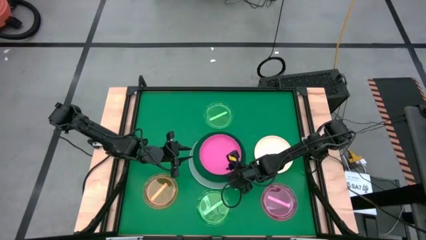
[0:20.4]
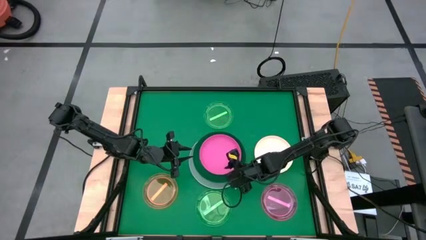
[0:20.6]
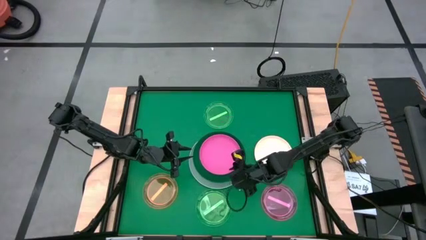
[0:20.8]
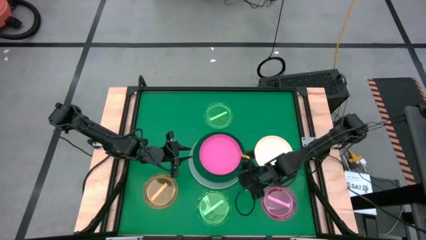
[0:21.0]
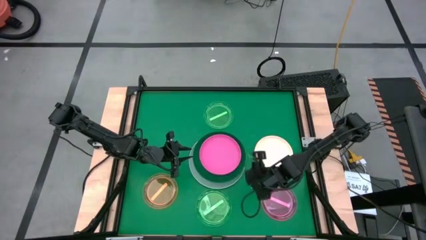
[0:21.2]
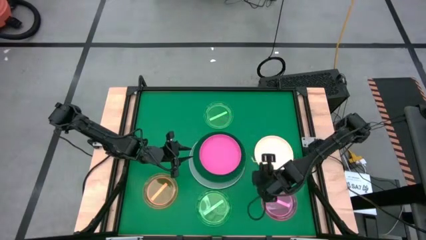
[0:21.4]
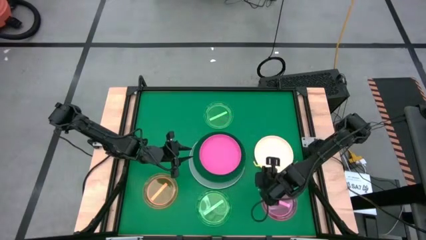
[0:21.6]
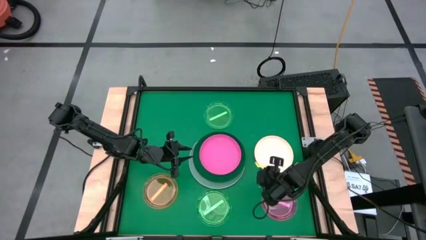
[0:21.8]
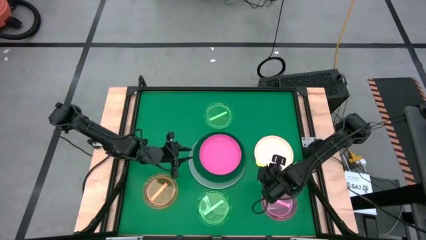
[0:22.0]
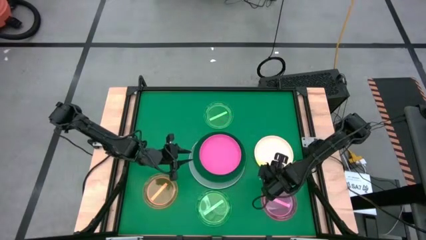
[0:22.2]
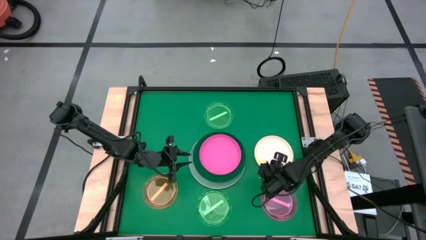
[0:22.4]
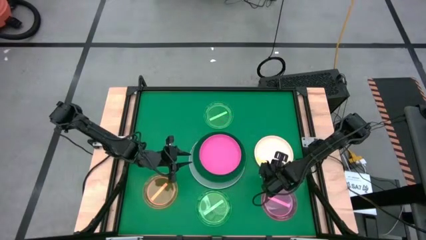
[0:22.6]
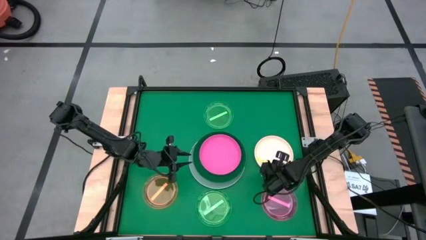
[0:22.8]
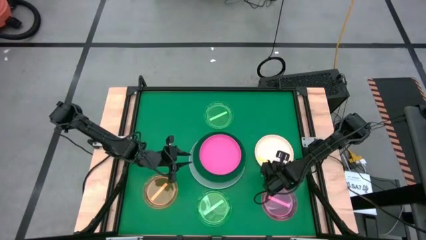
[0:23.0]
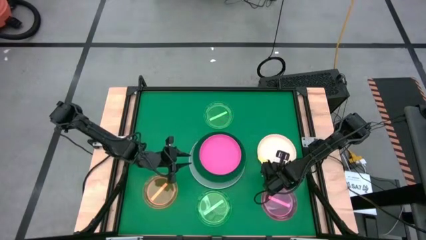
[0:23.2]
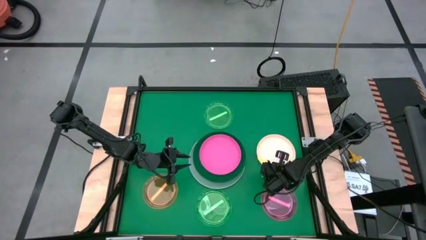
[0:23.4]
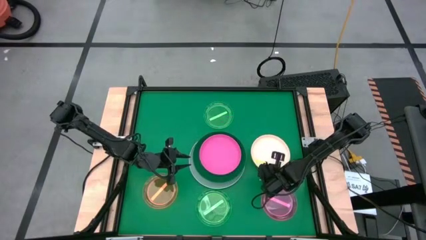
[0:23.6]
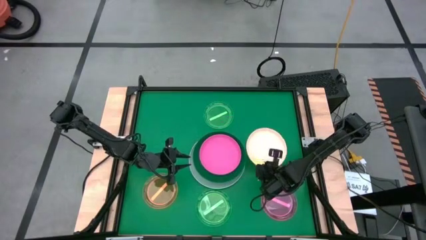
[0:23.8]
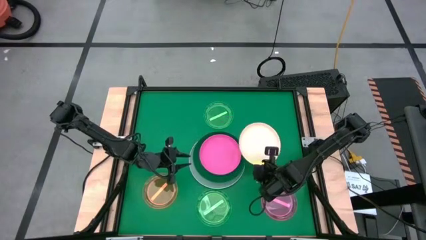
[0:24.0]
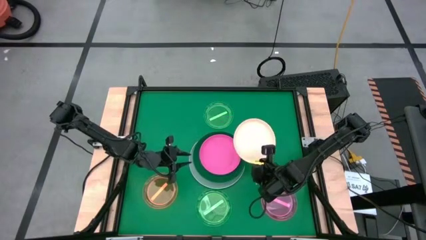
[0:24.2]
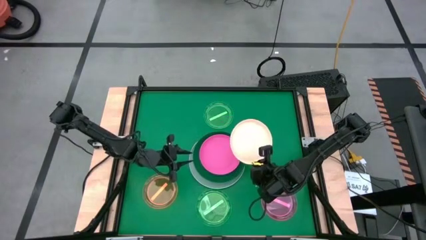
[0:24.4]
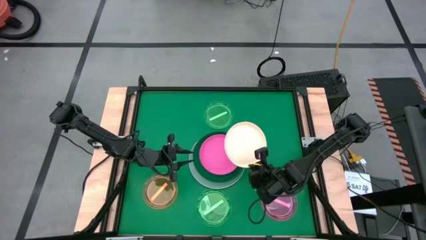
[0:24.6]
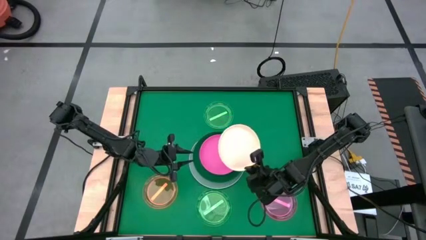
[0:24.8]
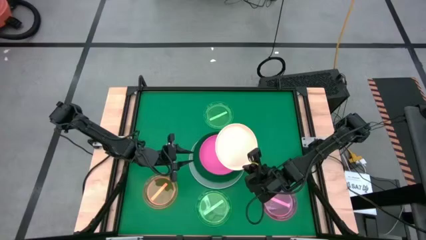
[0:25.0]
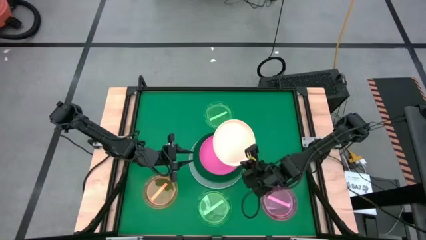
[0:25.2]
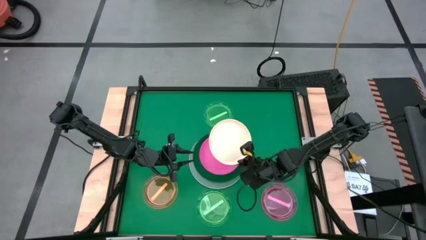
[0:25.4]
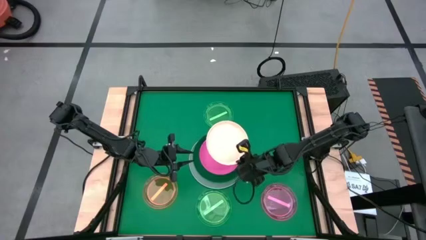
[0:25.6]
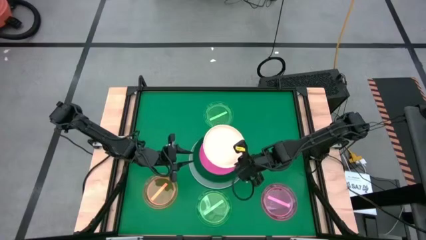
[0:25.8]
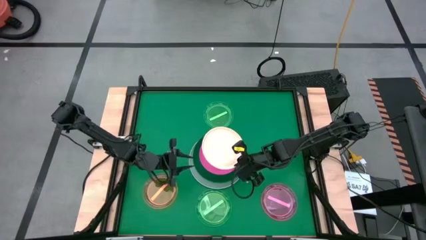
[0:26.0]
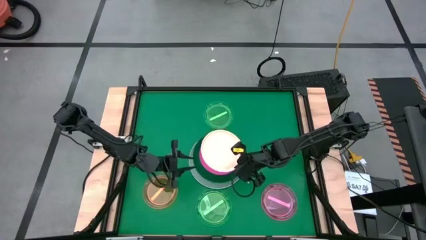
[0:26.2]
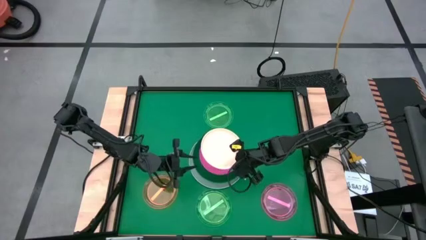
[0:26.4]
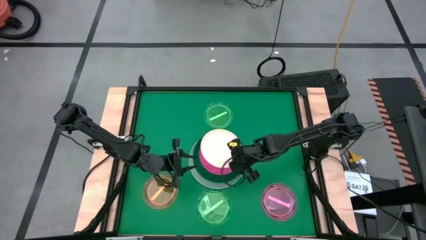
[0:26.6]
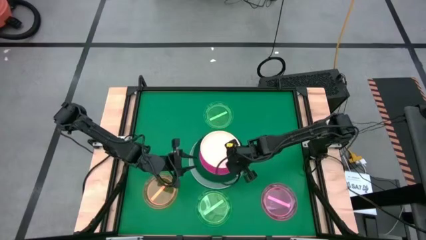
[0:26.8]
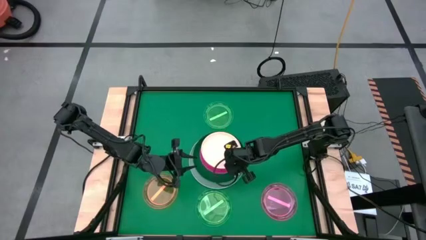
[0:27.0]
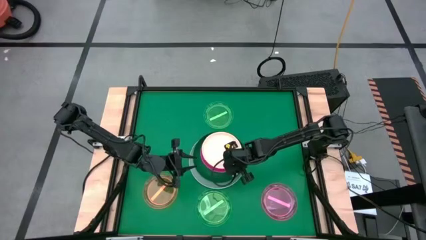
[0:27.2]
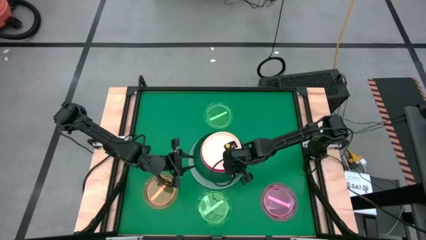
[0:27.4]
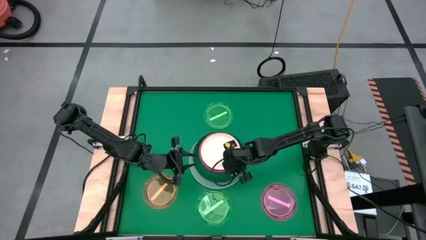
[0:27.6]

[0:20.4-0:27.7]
Task: Stack plastic plates
Stack the large white plate on top of the large pink plate

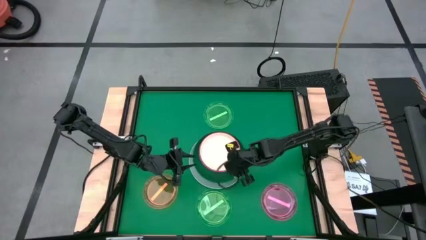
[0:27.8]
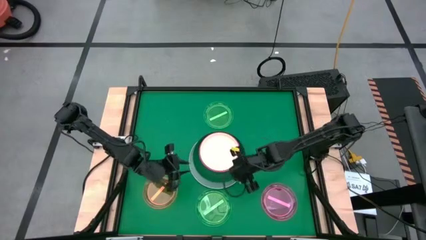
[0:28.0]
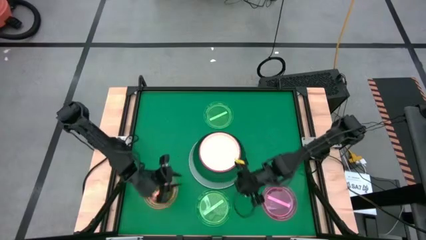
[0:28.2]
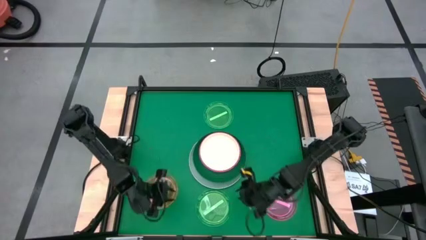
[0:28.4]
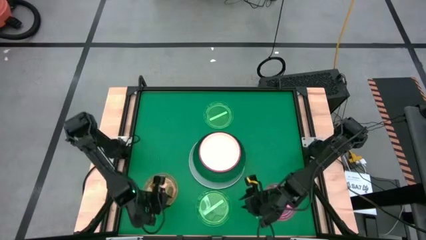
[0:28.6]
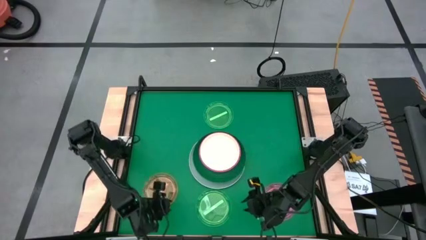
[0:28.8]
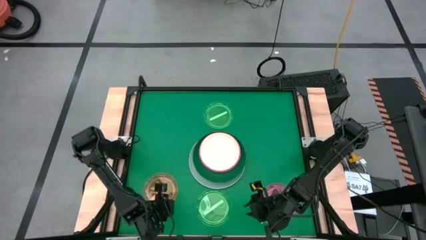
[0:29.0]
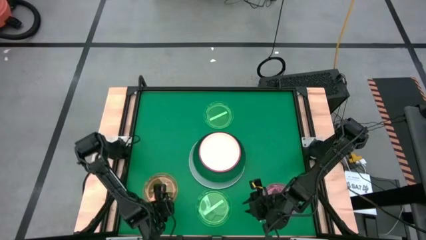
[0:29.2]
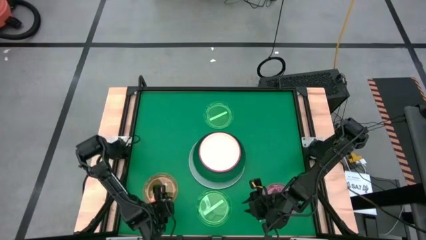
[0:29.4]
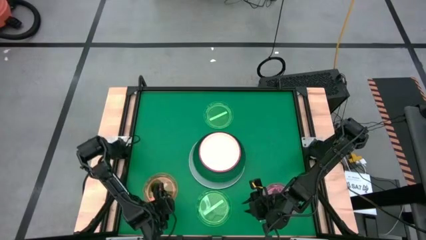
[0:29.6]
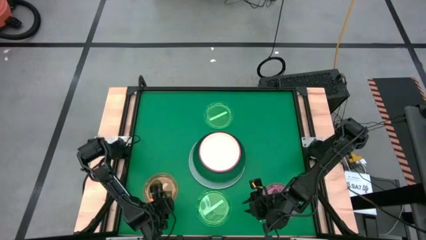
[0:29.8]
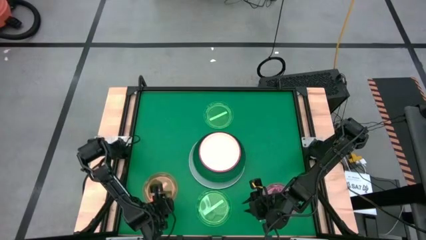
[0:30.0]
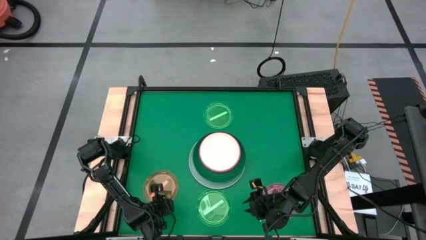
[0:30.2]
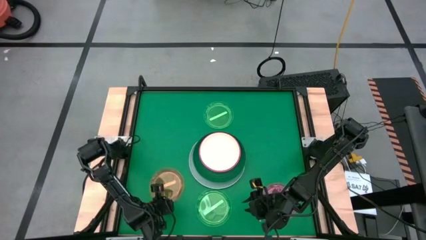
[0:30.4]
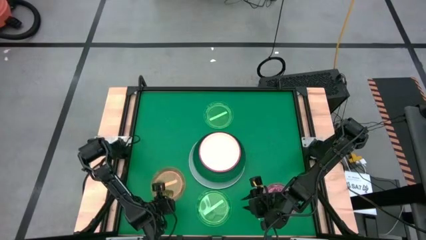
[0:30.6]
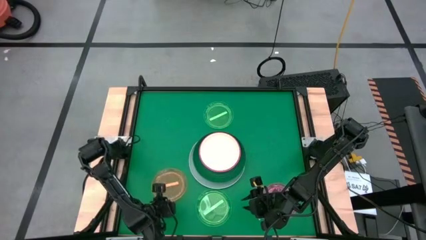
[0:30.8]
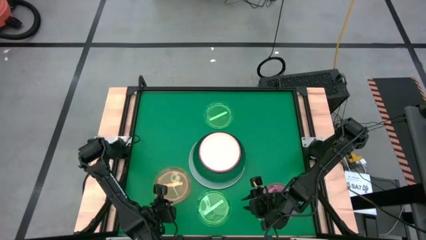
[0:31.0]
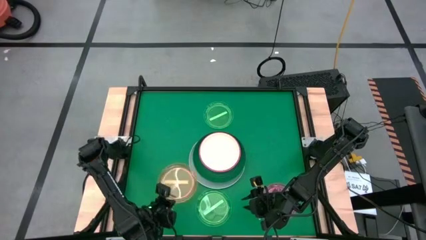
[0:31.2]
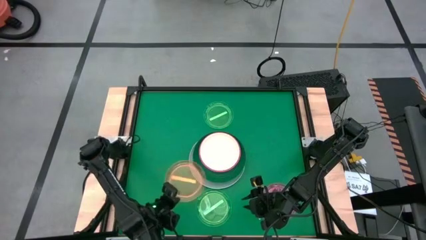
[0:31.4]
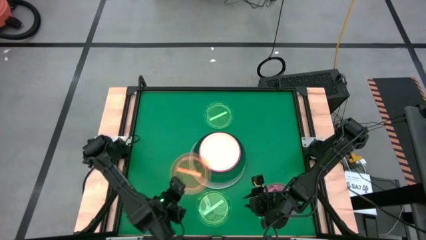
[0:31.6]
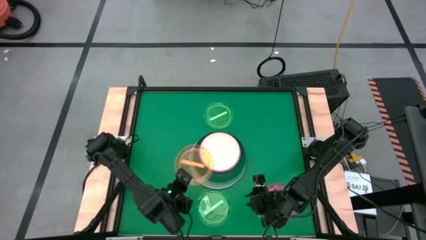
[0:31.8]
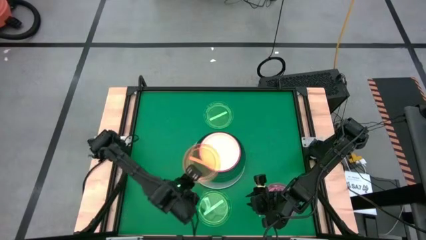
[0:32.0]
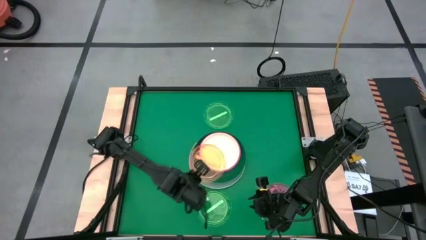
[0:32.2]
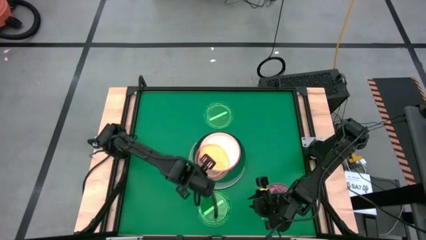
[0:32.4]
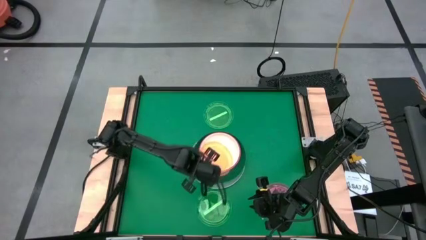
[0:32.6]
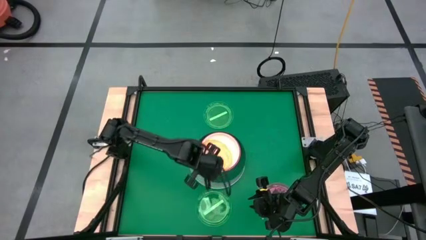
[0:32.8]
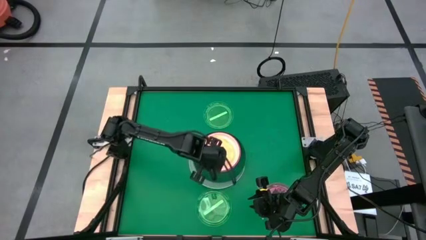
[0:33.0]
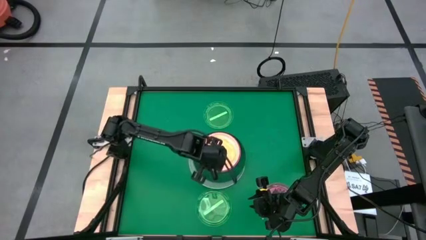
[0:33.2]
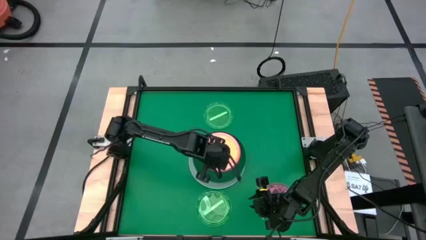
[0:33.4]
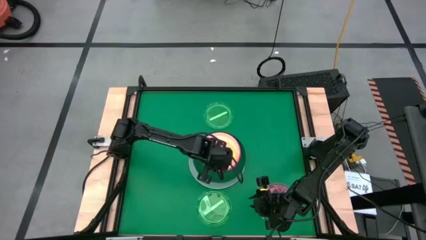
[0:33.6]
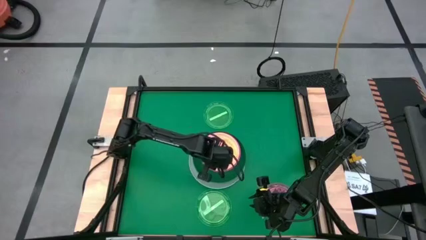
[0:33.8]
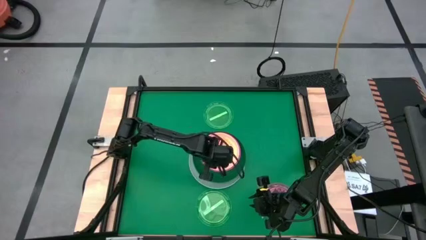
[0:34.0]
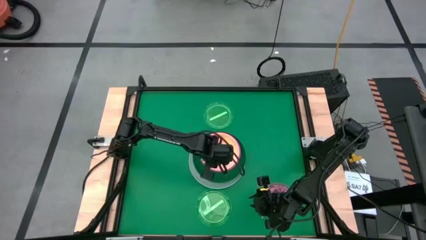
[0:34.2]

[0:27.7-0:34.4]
Stack the small orange plate on top of the large white plate

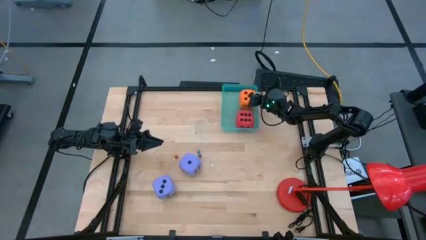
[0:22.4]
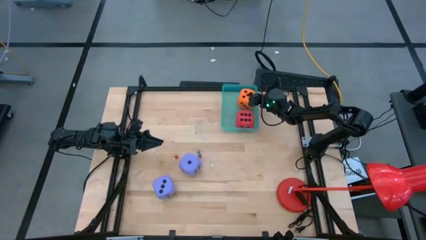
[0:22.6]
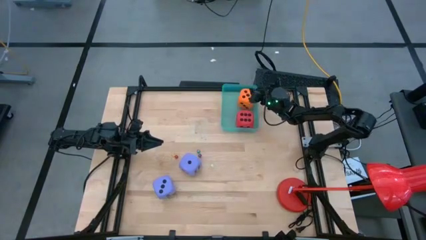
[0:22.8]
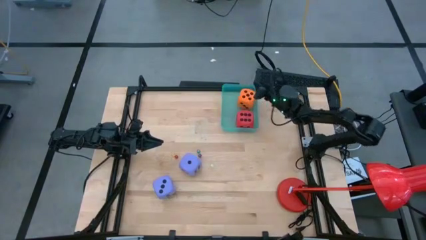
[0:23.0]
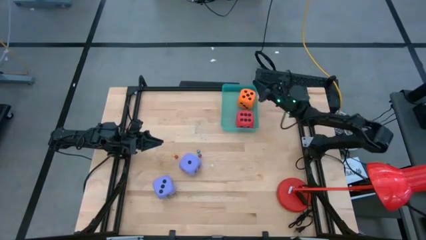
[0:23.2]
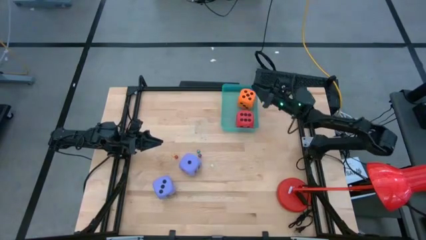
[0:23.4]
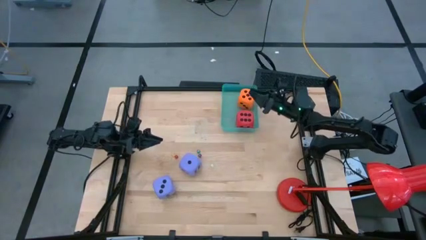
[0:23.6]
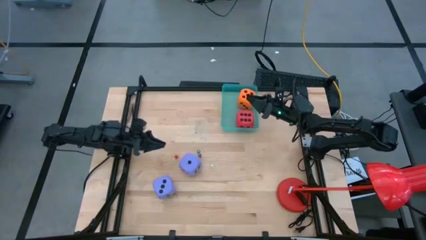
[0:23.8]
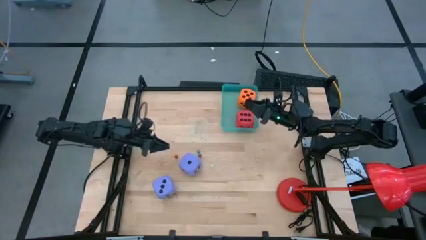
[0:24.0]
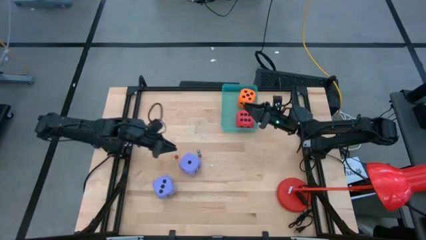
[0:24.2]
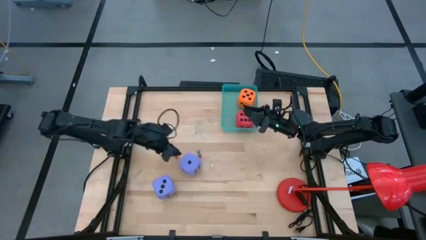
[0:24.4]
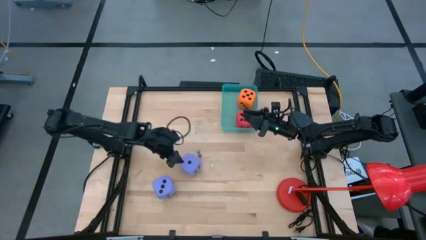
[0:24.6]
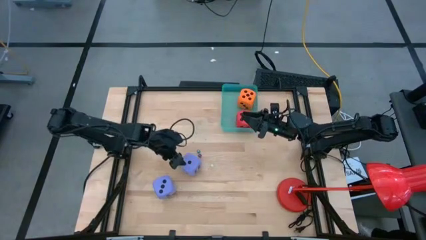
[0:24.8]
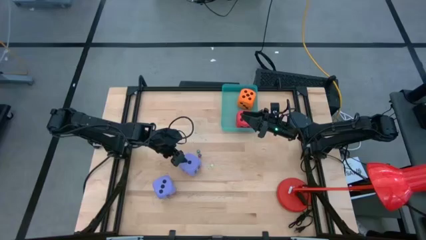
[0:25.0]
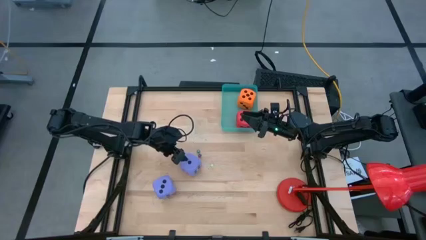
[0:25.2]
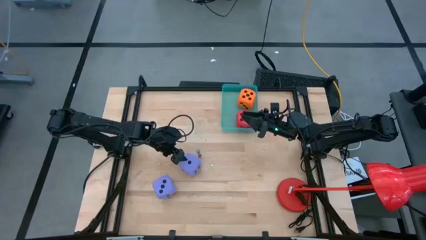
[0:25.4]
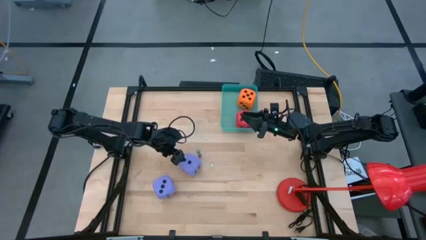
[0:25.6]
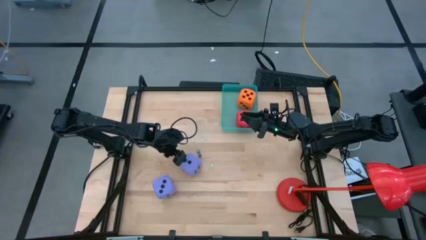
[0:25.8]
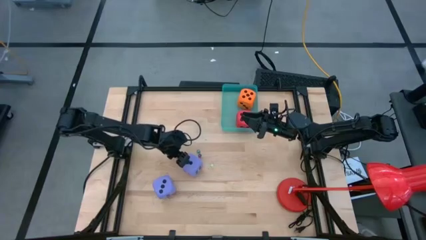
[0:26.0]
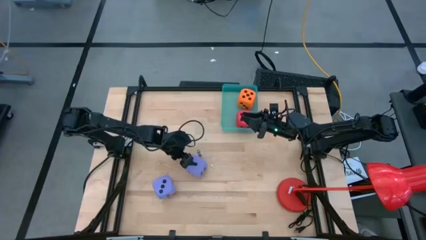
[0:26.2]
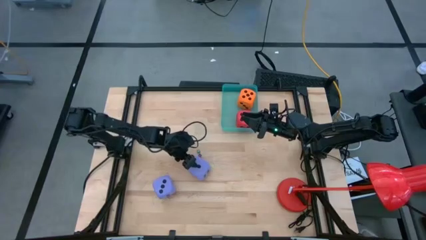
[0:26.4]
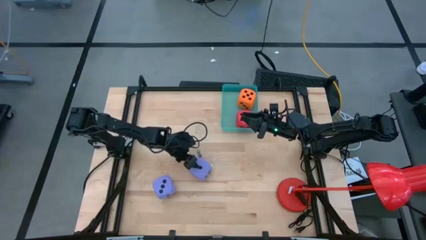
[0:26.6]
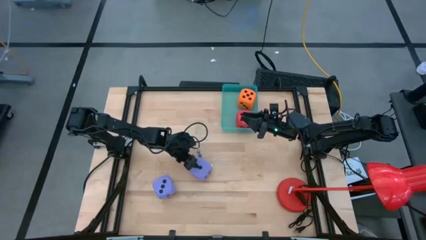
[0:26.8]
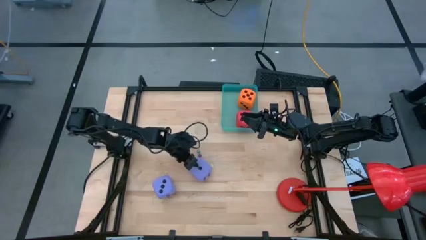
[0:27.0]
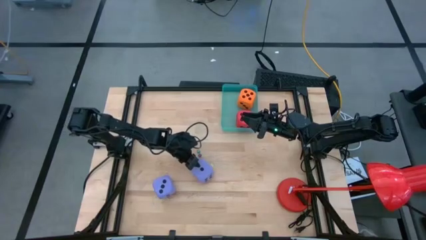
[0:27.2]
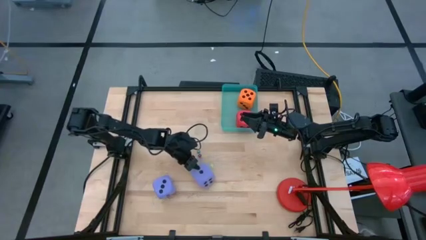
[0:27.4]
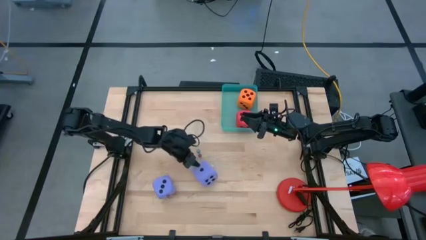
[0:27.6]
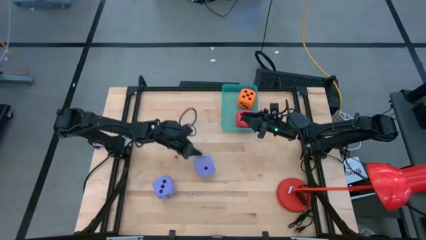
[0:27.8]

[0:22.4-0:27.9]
Task: Pick & Place Dice
Put the large purple die into the green bin
